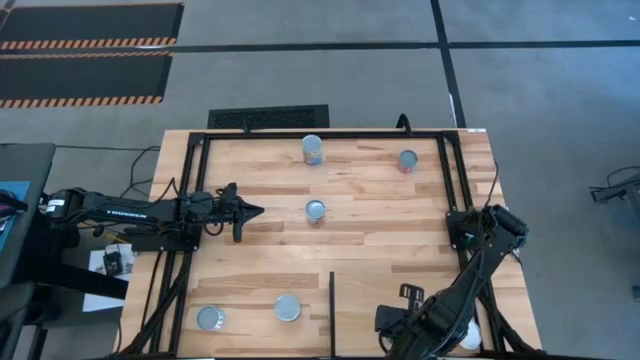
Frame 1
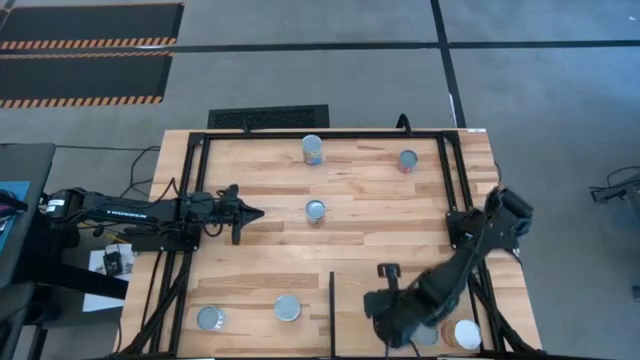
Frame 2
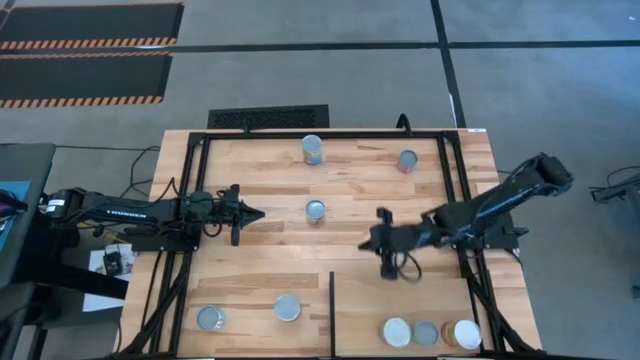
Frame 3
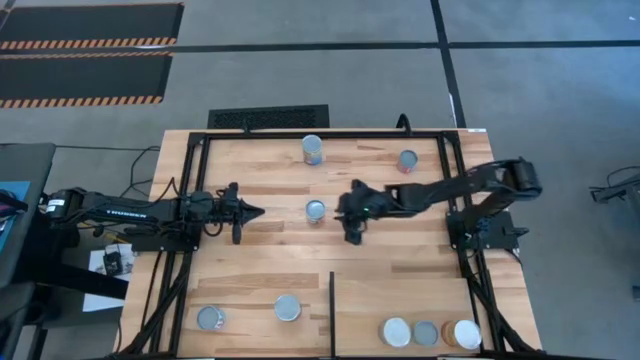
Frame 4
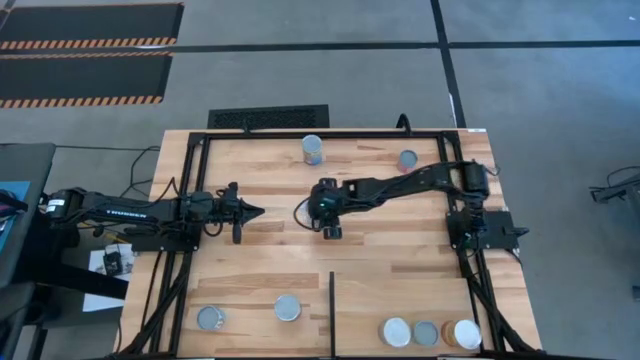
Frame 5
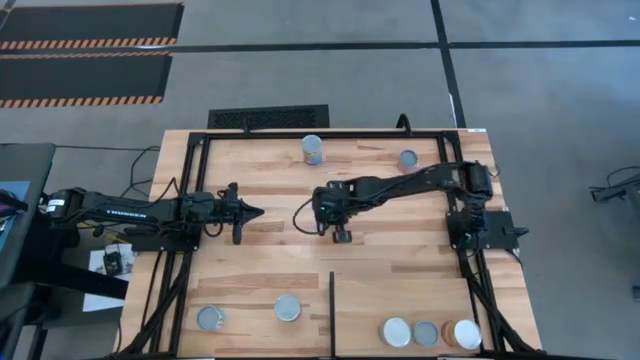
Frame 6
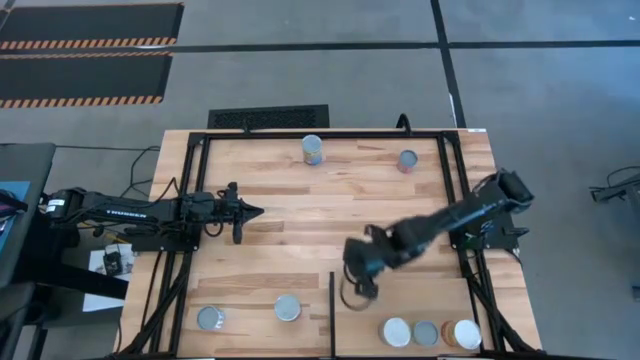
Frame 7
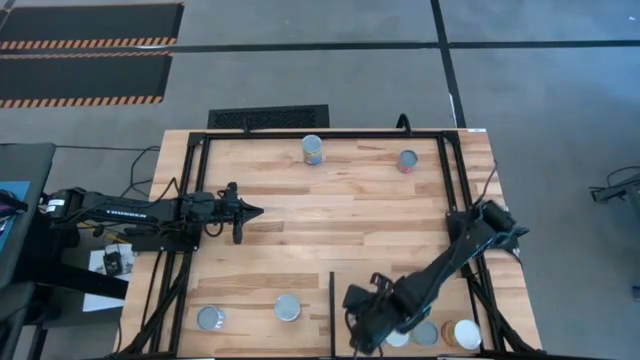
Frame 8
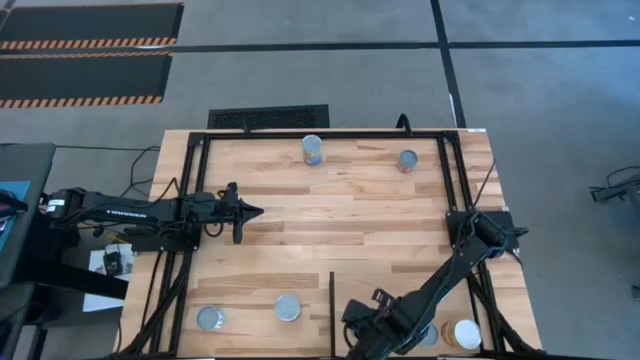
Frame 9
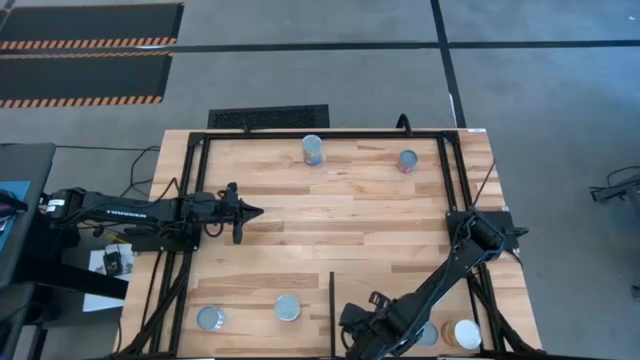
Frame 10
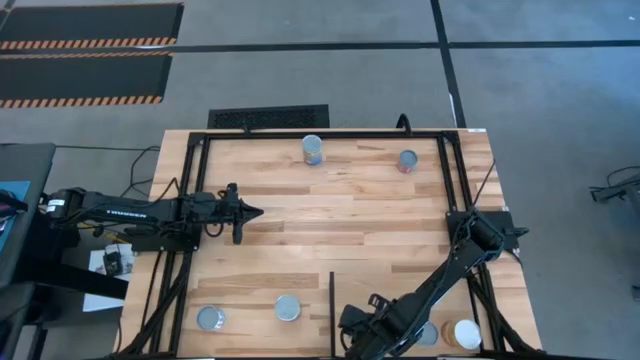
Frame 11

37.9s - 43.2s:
Task: Pick and place cans onto a shelf
Put the canned oranges on the shelf

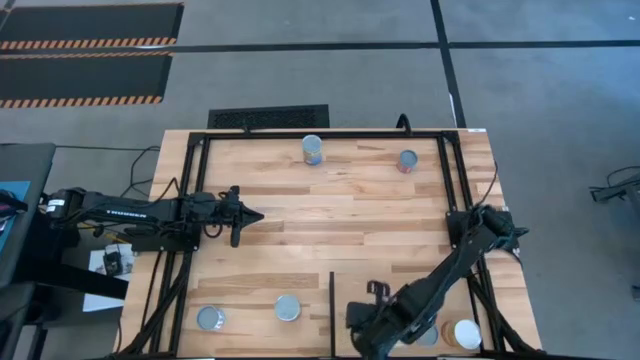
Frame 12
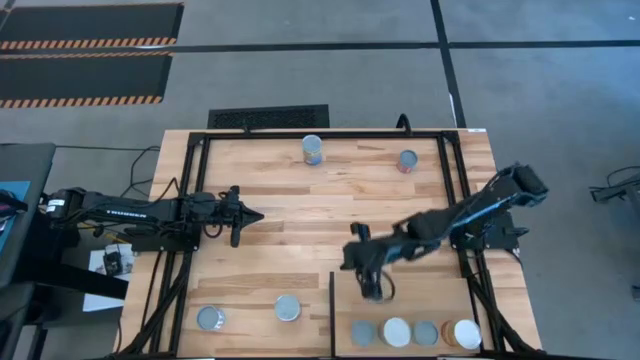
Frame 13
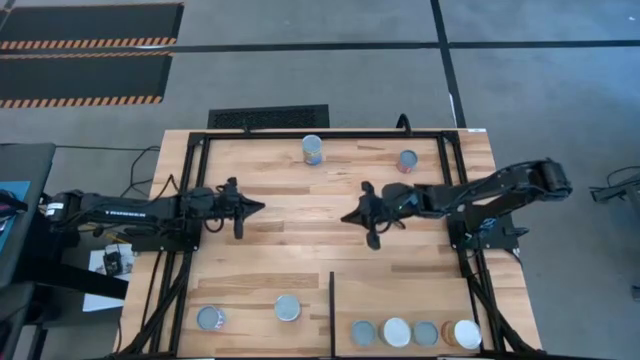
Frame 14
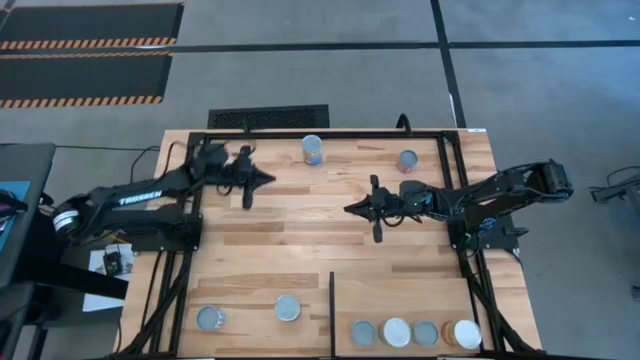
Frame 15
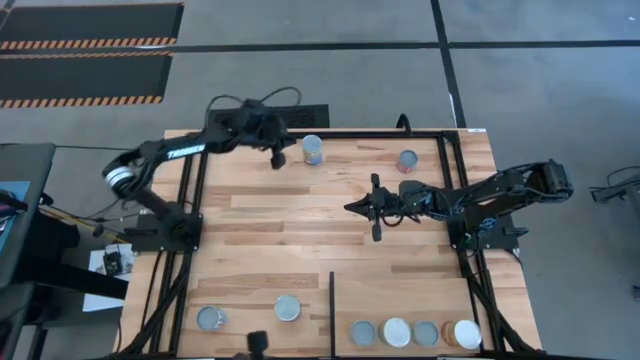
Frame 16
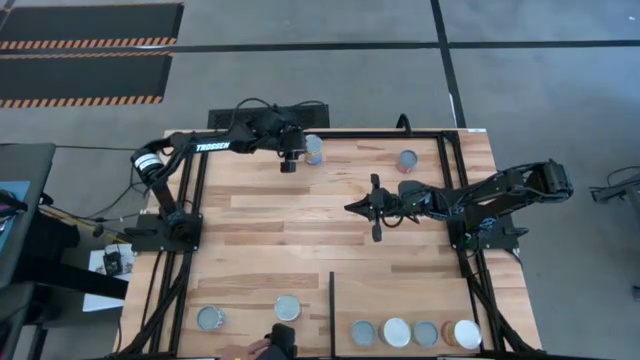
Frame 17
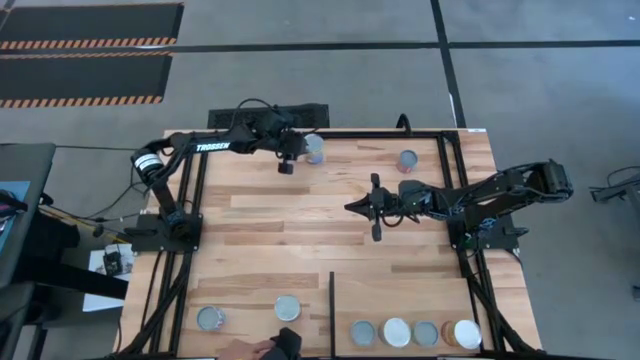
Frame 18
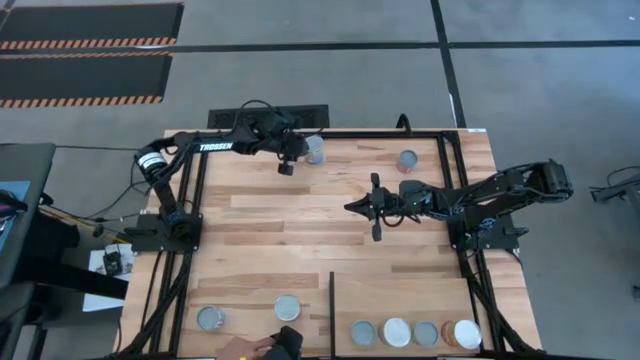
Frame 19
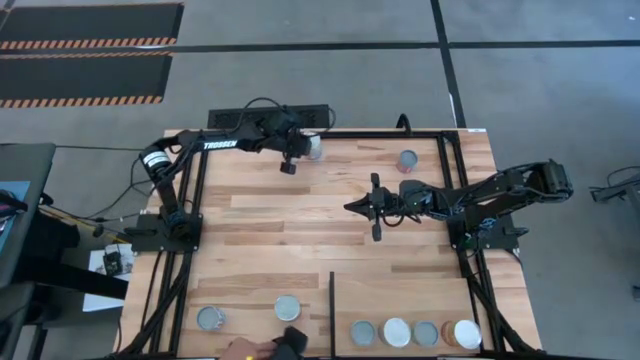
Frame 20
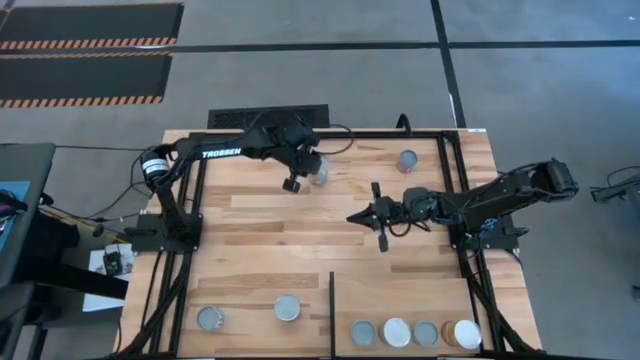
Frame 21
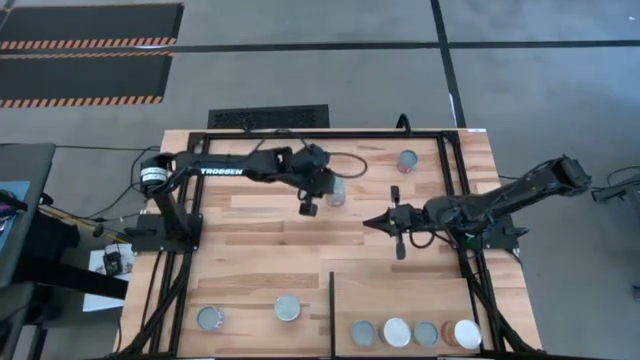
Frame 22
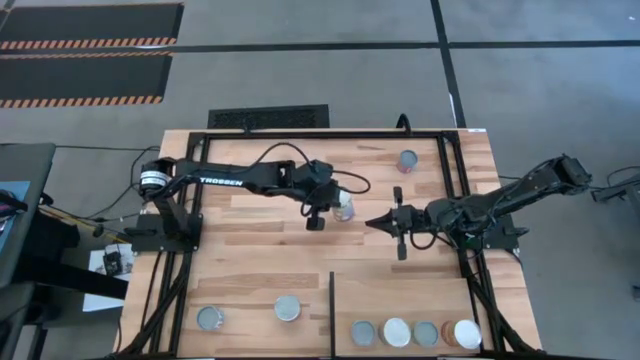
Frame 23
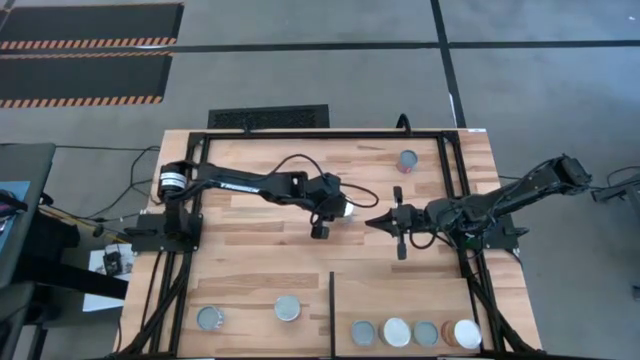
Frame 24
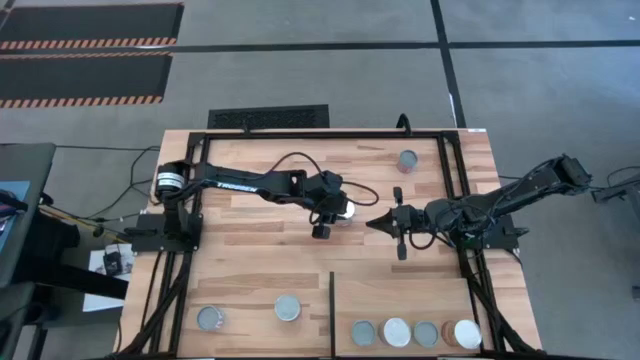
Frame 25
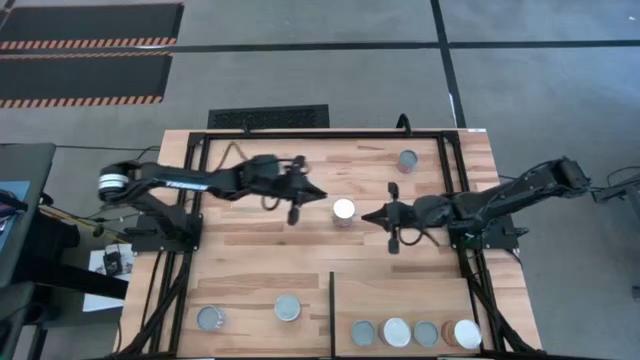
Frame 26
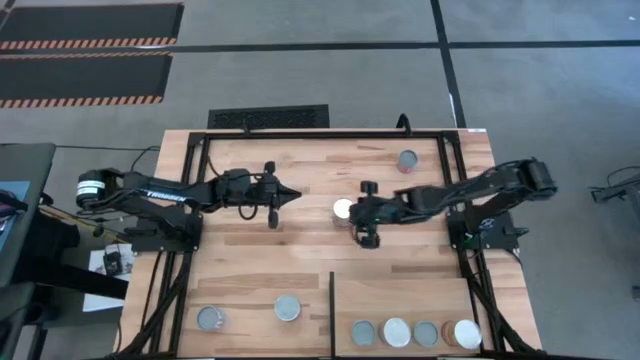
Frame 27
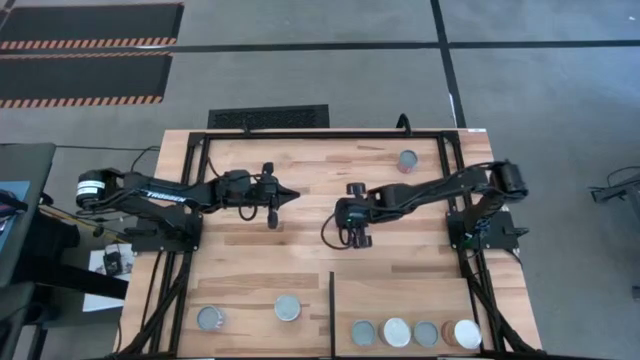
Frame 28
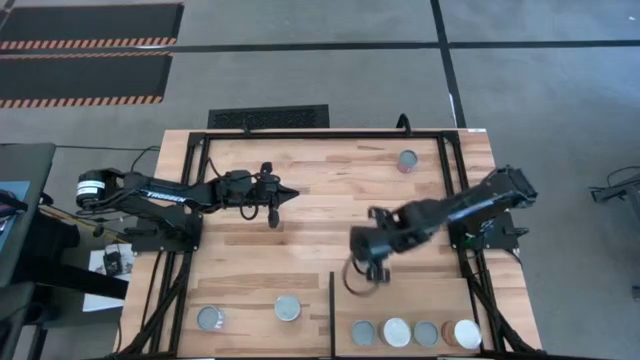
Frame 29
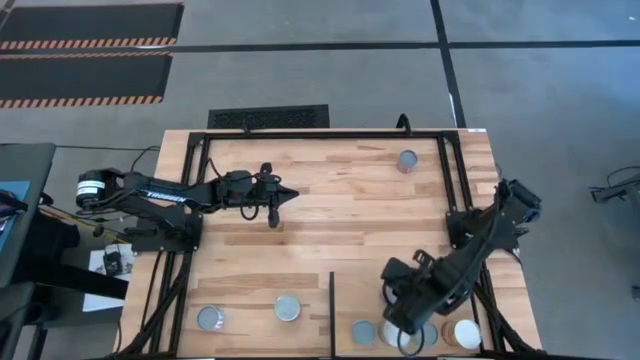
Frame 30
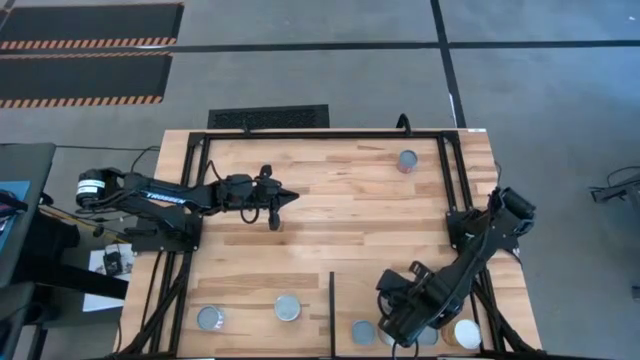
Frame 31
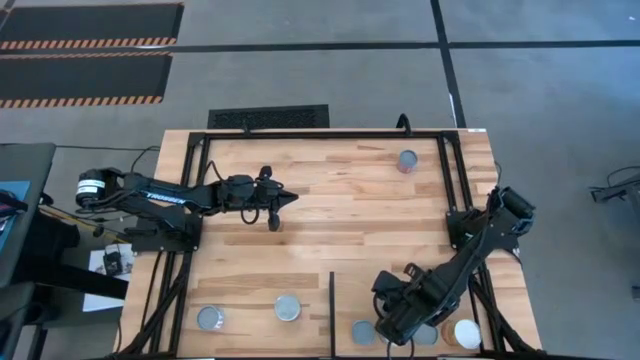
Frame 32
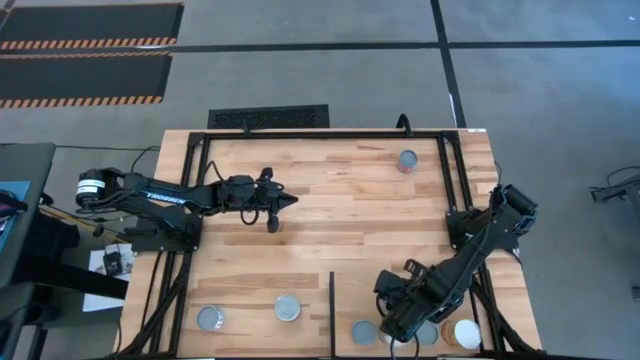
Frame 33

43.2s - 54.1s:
Put the canned peaches aligned with the other canned peaches on the shelf

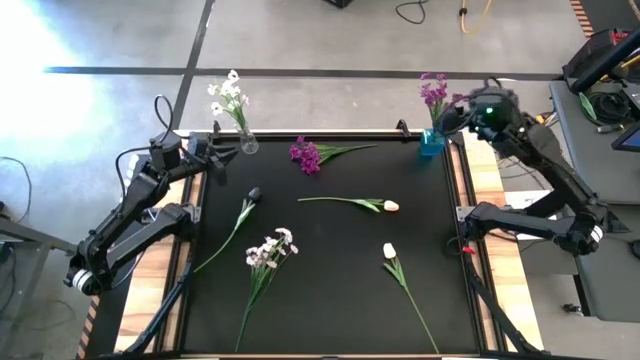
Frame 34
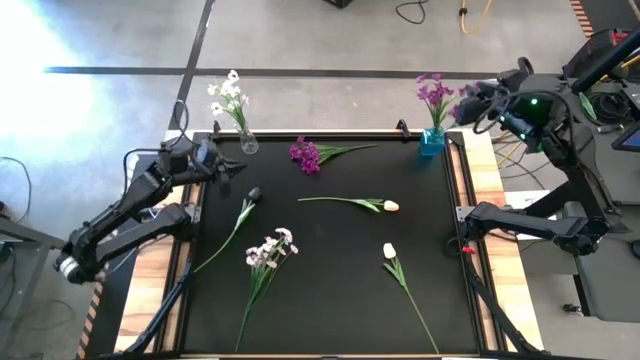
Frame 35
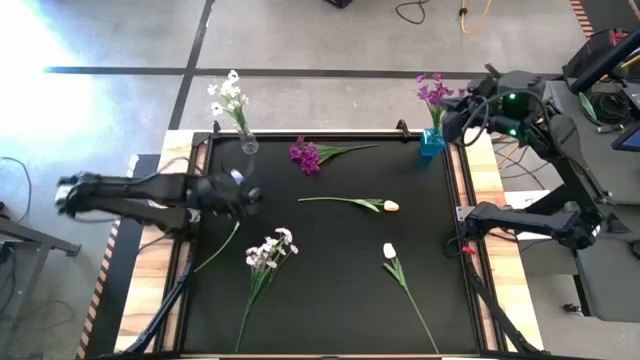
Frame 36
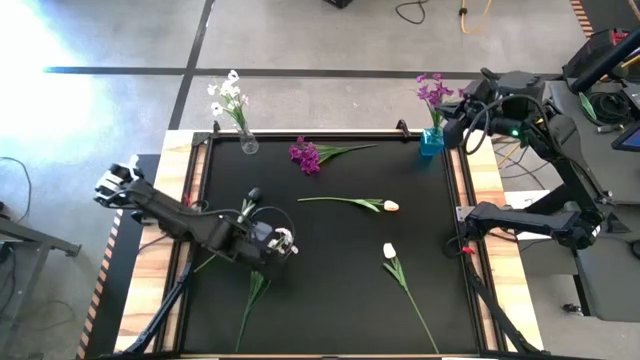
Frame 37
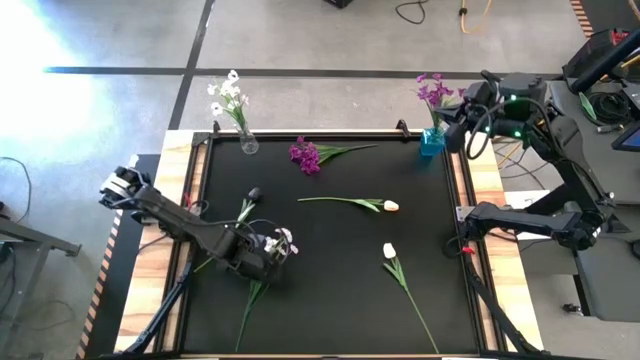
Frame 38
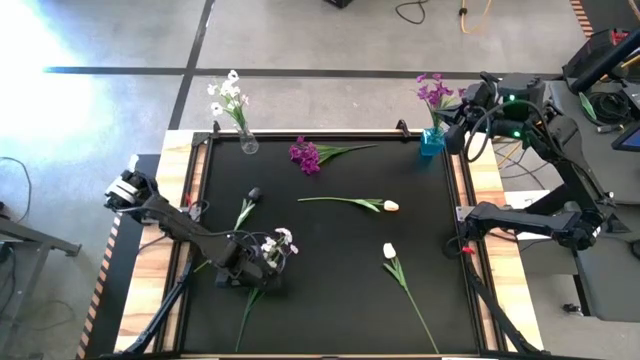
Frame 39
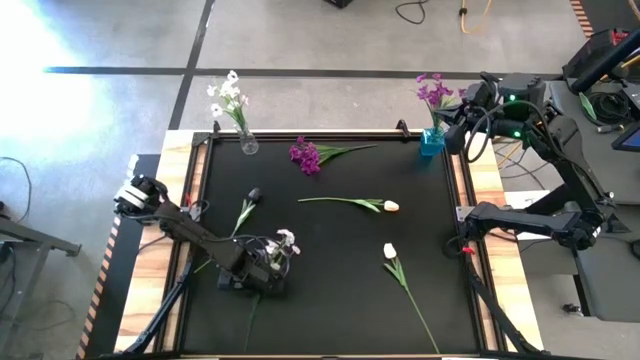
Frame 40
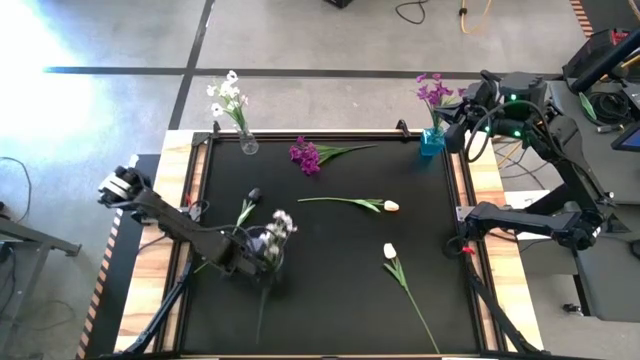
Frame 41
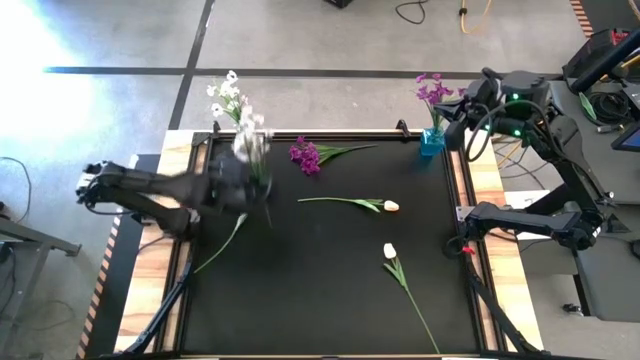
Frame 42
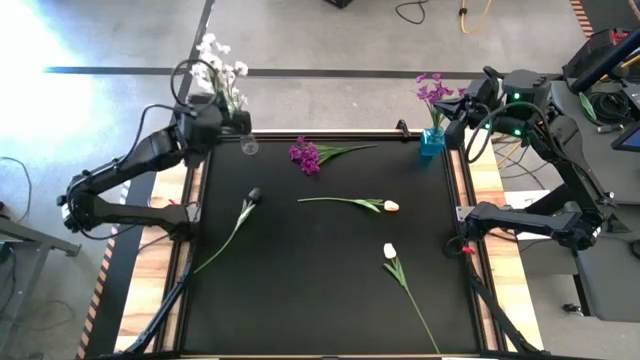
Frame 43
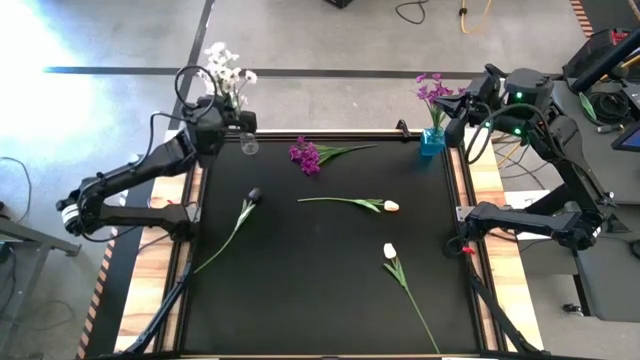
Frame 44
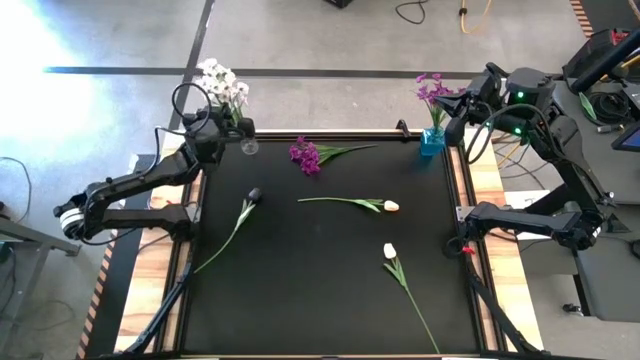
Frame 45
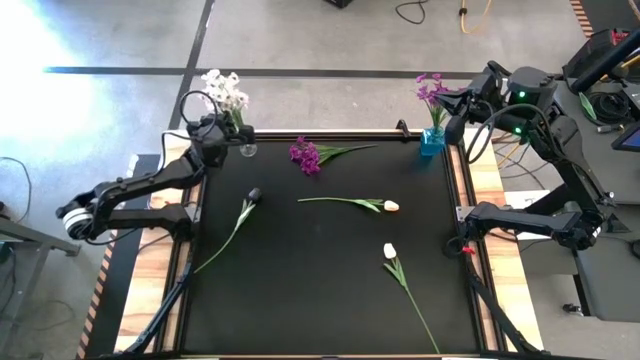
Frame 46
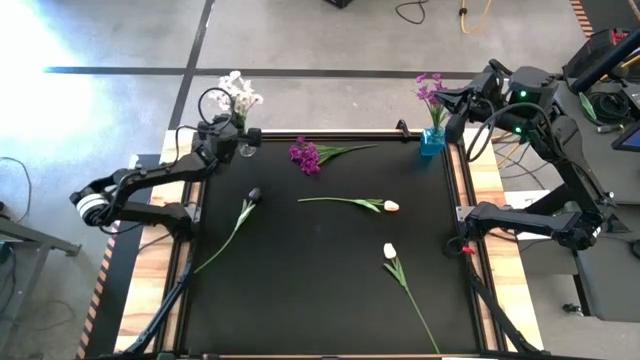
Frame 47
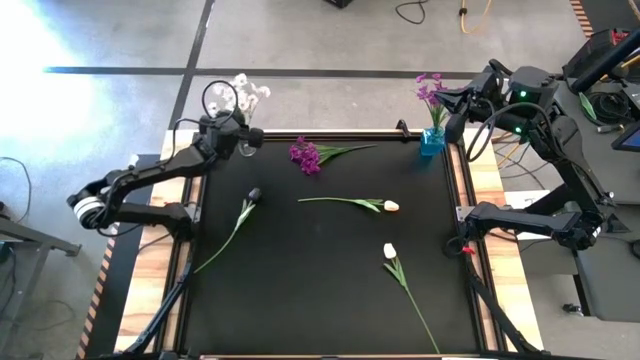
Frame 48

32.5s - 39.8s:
Task: Sort flowers into vase by color
Put the white flowers into the transparent vase
